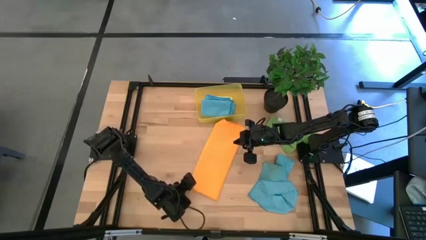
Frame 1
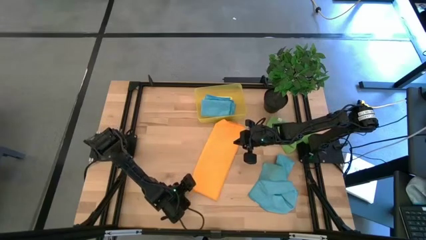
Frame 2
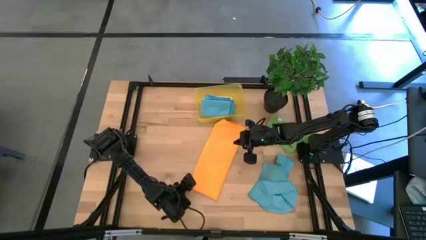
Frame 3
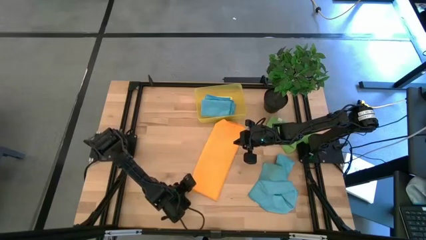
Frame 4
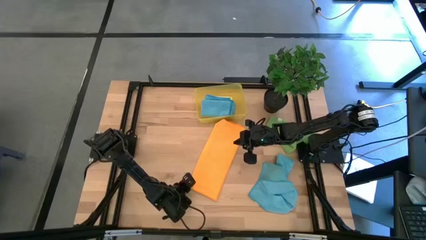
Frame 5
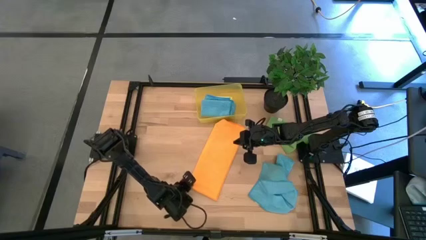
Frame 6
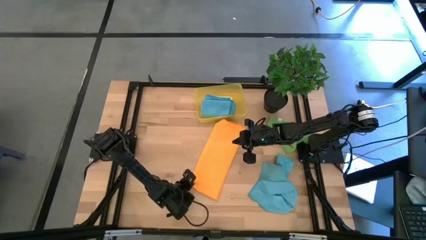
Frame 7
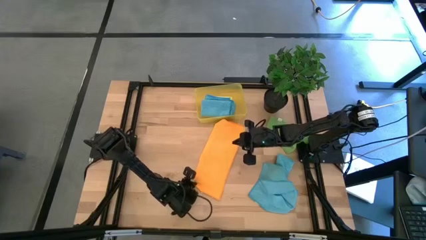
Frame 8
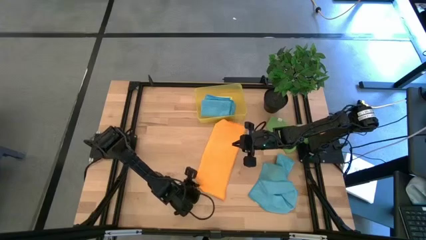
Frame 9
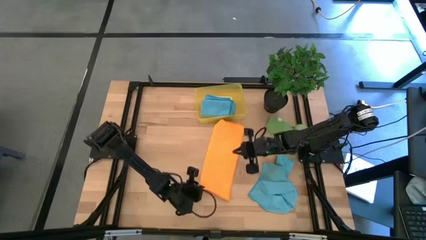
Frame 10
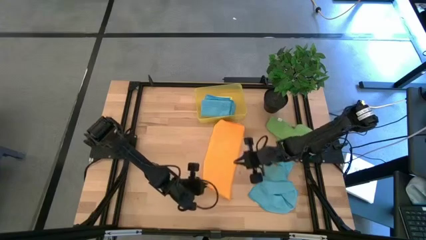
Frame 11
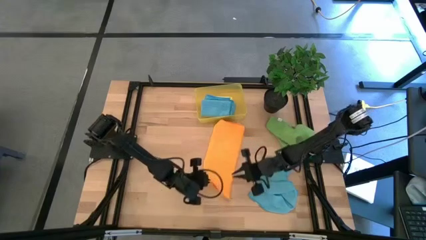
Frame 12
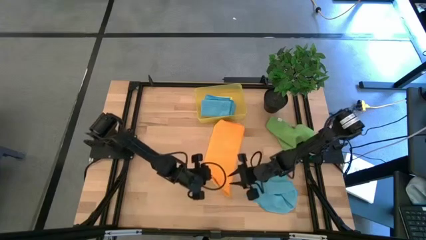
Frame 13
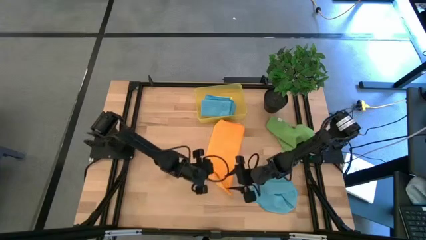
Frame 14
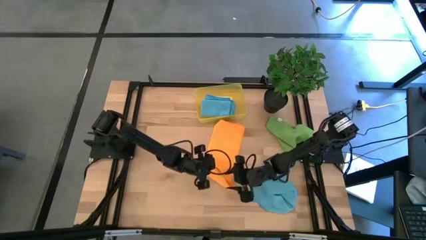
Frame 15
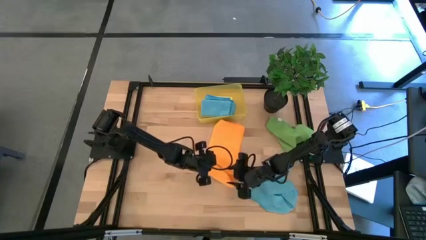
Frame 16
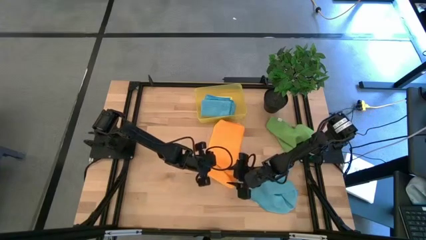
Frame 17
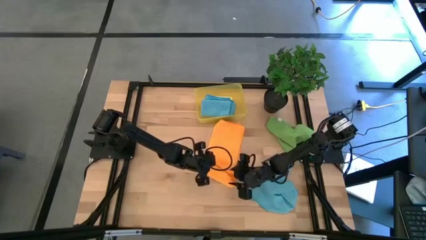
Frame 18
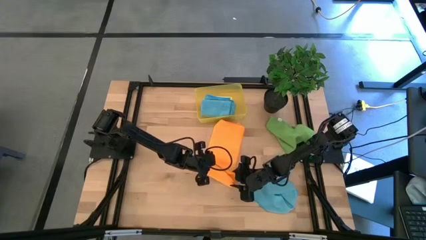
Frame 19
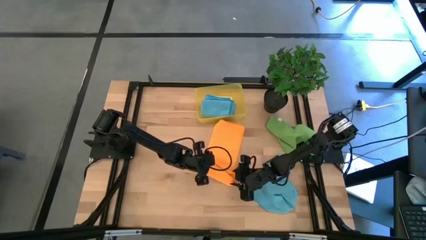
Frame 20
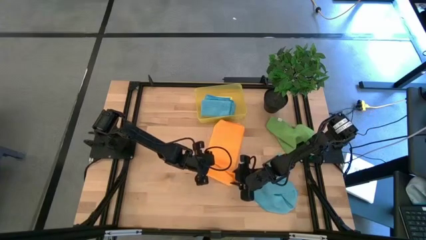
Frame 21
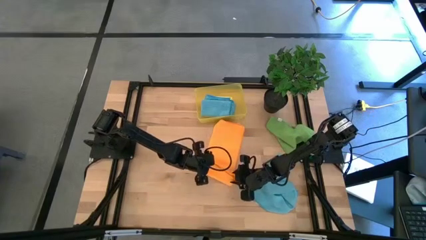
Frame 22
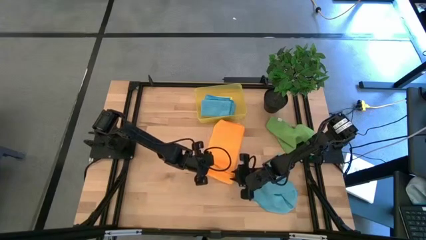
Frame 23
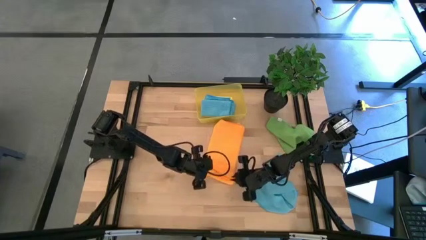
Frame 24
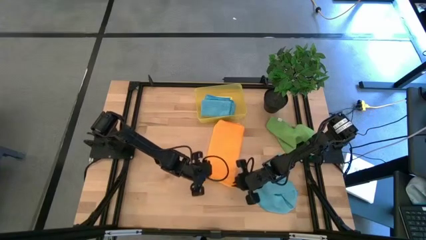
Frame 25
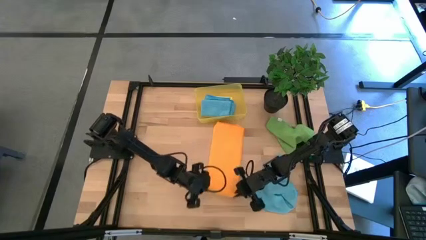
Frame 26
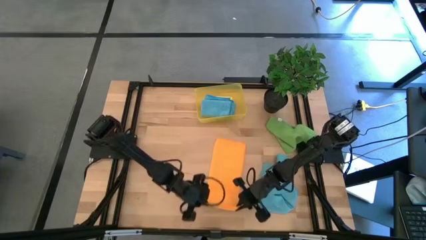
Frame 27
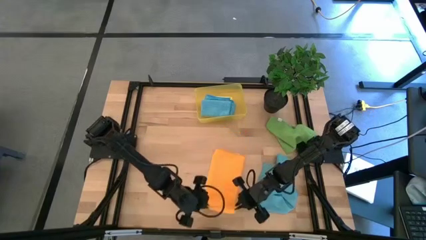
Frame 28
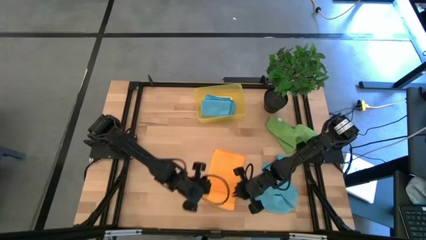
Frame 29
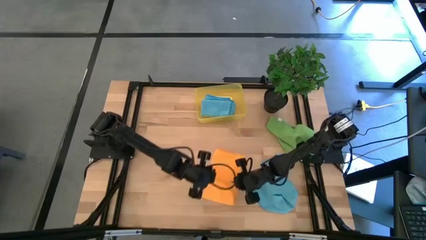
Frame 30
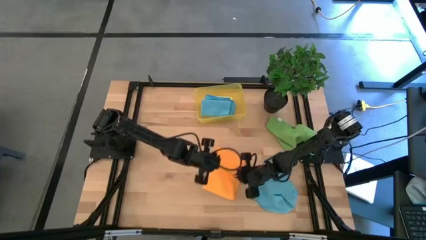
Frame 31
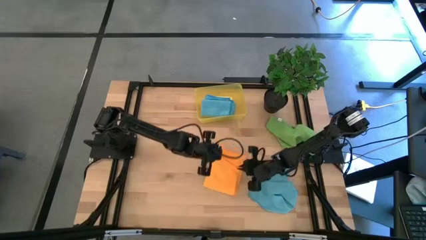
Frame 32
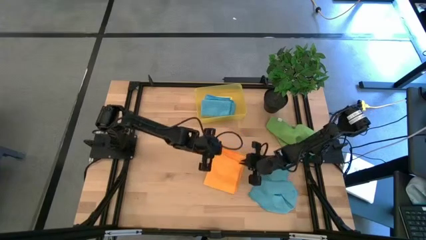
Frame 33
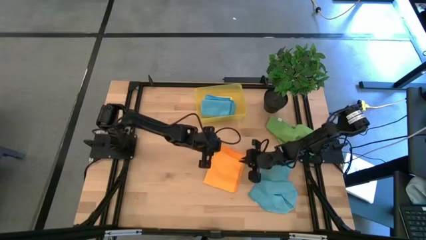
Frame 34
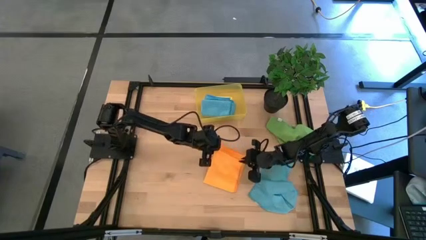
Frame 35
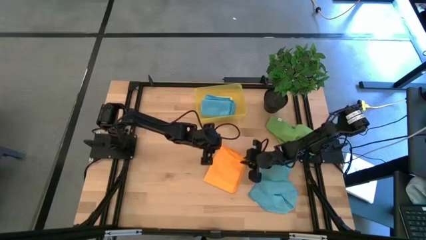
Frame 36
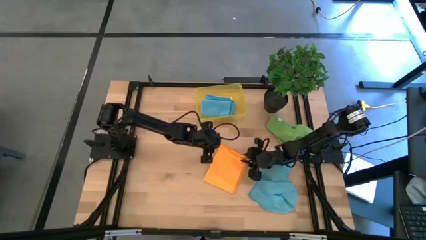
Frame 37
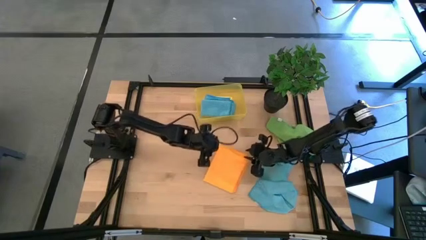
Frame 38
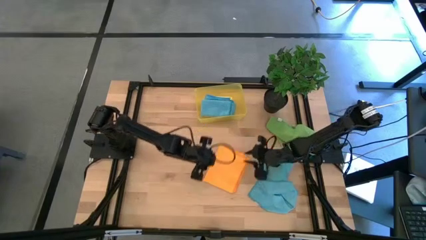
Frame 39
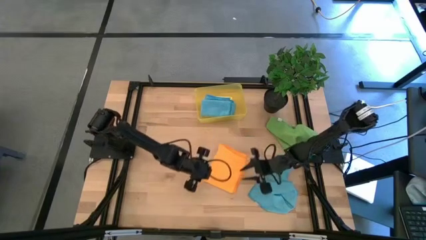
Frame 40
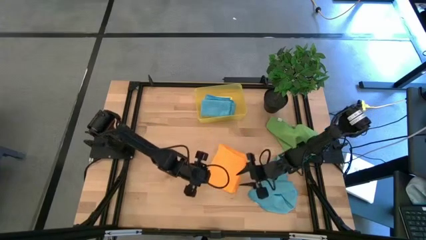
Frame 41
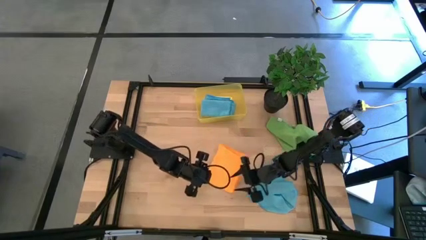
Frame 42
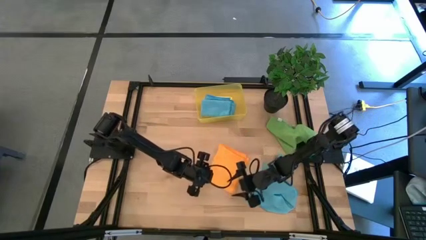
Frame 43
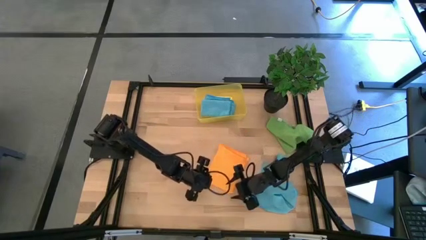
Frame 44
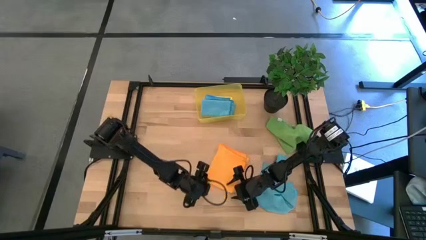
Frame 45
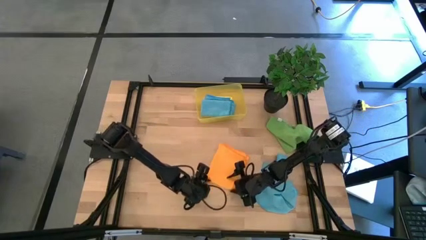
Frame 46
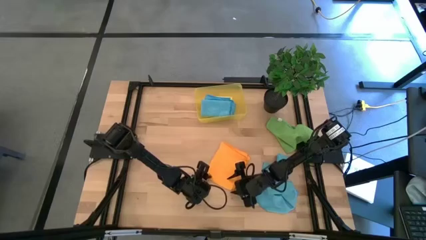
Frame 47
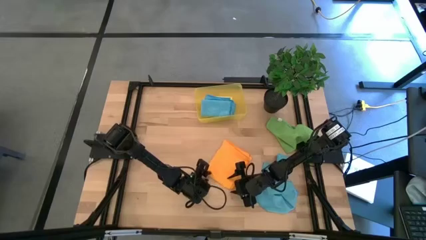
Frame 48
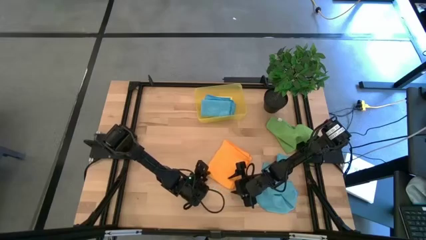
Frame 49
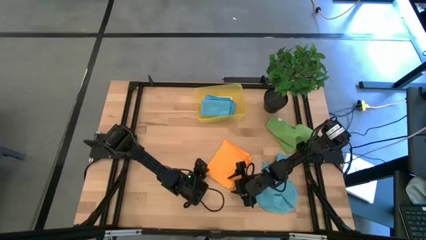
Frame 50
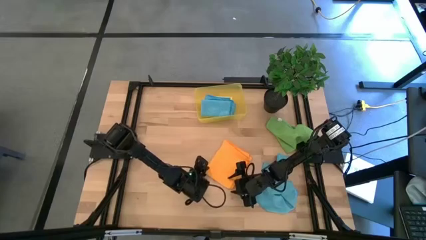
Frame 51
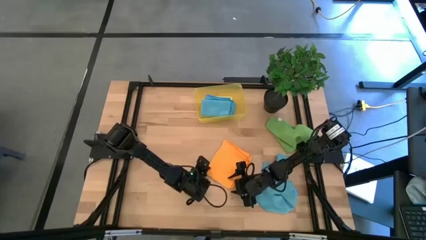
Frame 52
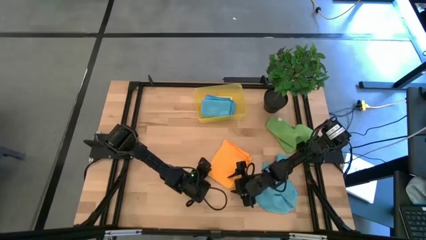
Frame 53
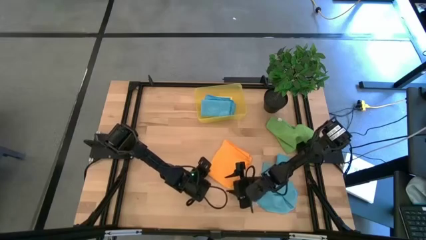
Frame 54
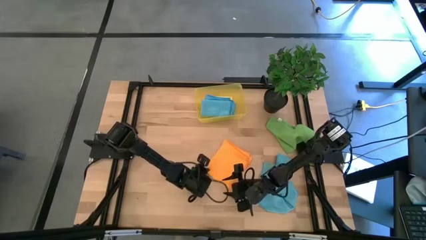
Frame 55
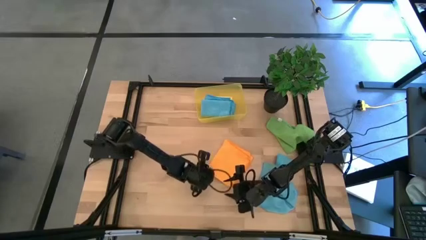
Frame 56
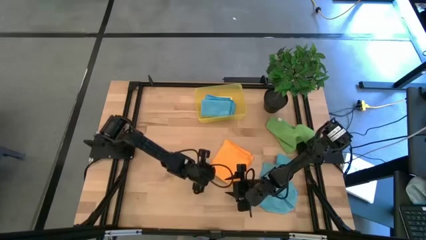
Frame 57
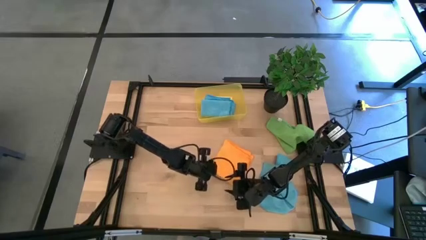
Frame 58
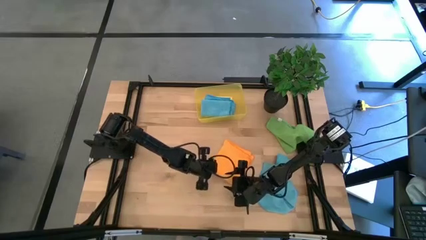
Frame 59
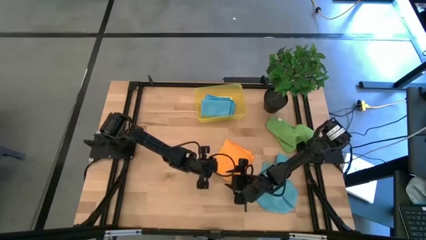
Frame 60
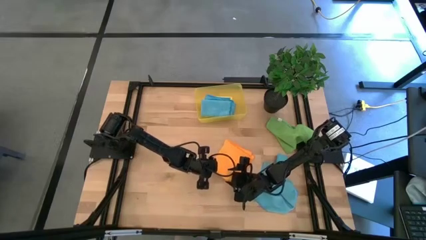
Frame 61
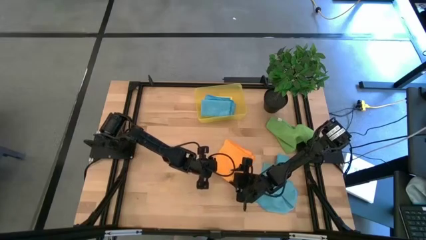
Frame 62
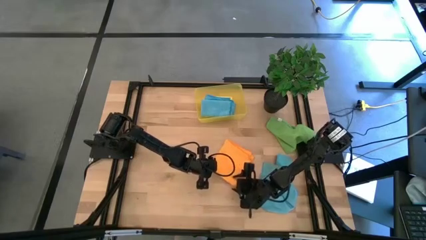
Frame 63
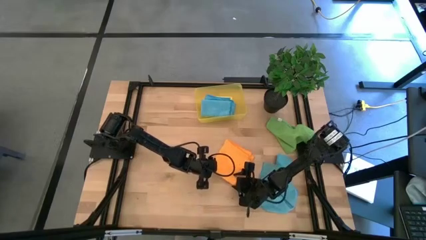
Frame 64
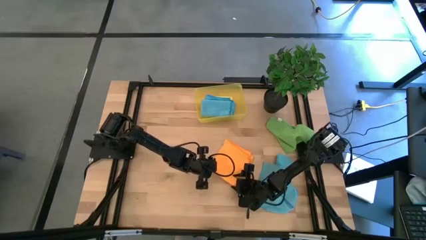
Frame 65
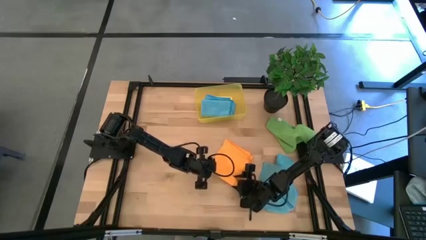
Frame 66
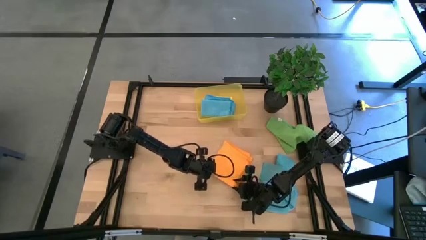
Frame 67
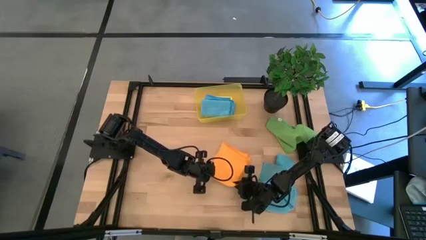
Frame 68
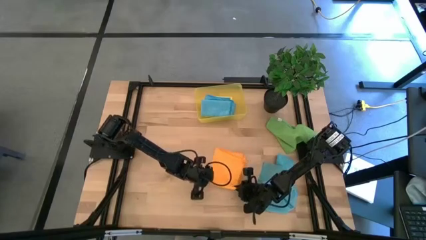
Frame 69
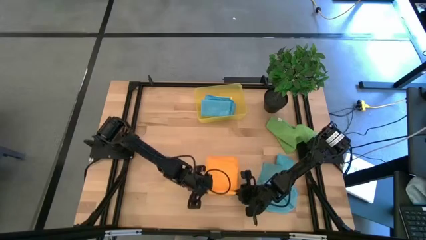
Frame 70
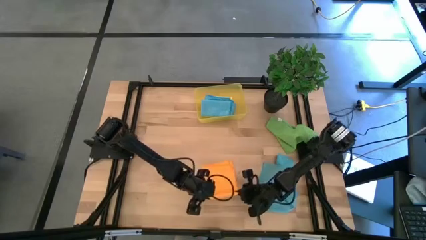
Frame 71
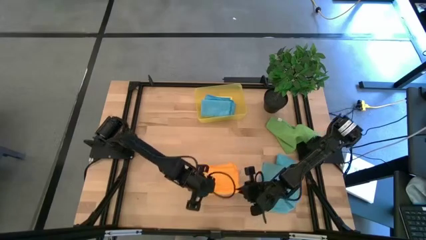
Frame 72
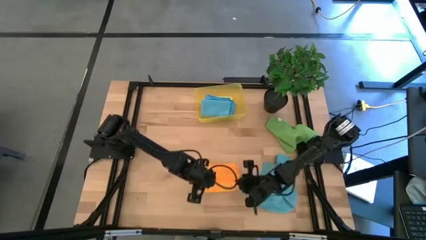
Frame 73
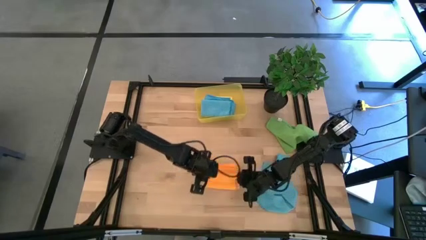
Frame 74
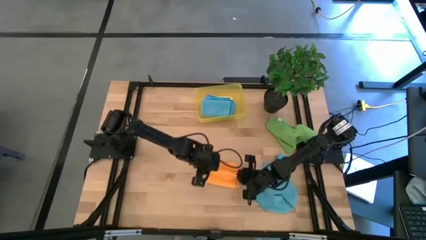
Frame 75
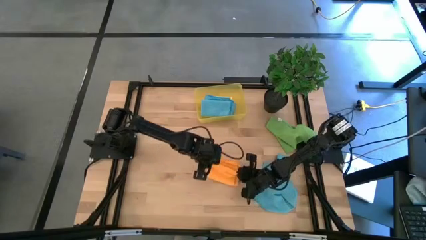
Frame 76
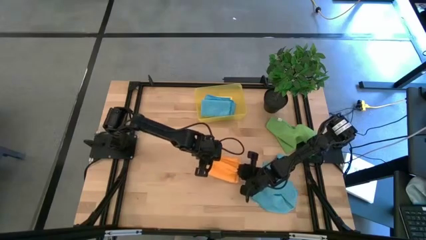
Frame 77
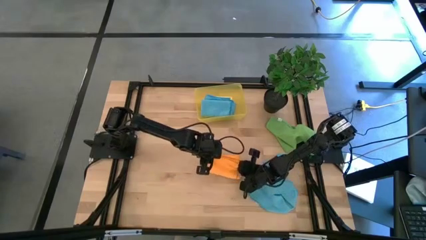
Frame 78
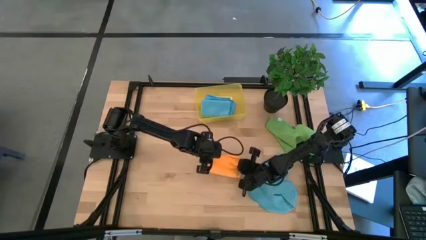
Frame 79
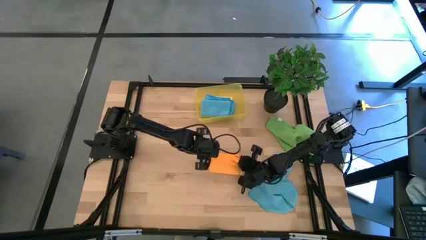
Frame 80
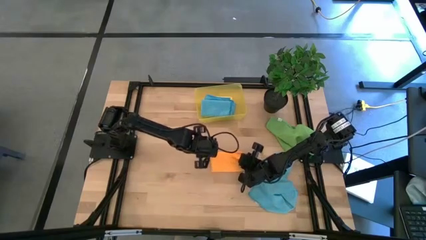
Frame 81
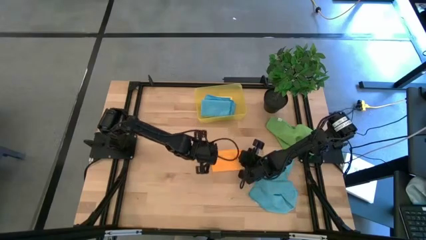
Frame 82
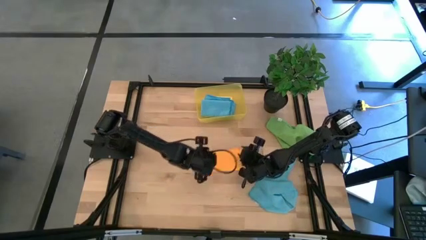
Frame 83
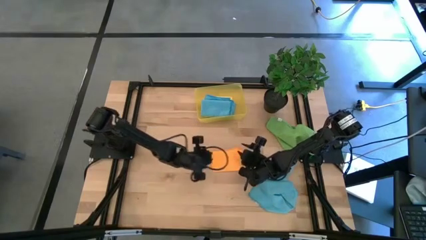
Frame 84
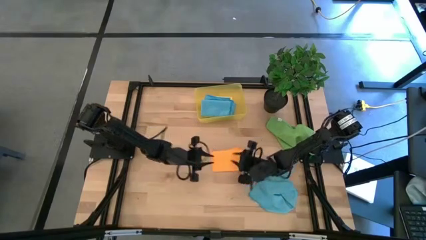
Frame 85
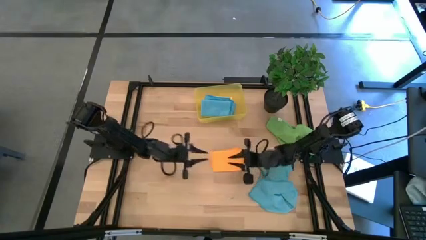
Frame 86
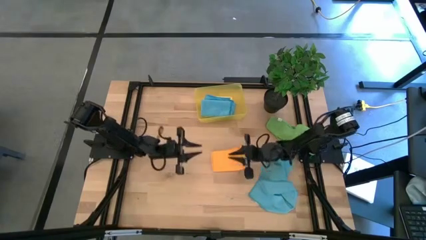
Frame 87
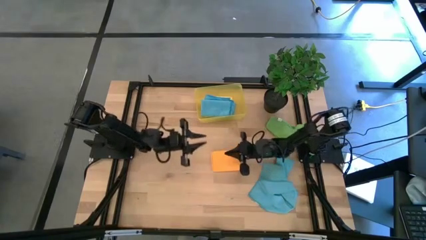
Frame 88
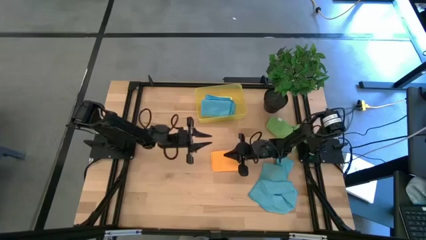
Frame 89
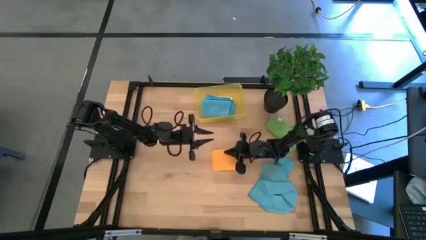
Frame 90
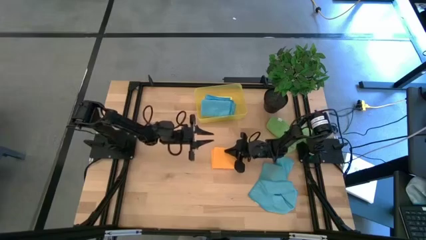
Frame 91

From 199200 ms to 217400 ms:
Task: Fold microfiber towels
Fold the orange microfiber towel
